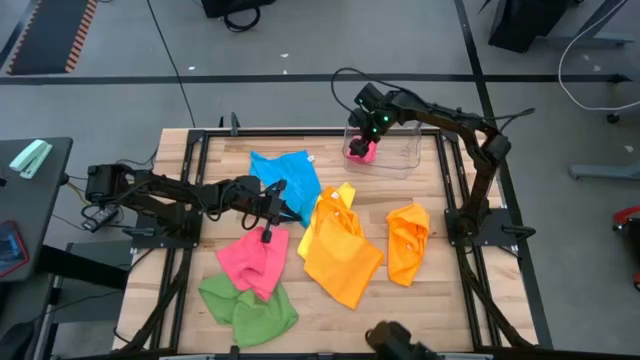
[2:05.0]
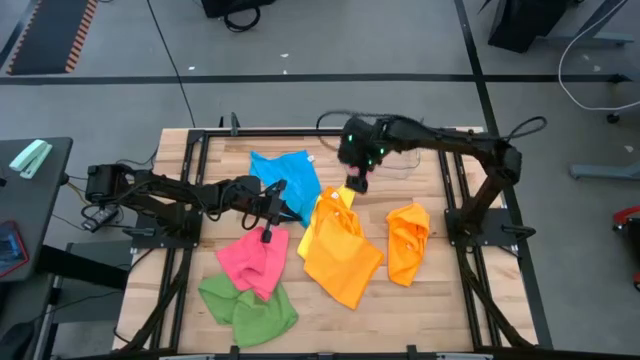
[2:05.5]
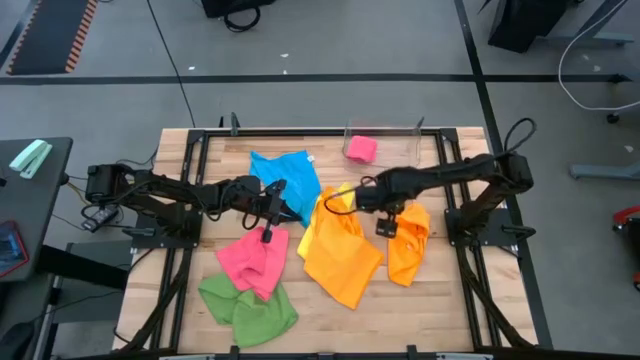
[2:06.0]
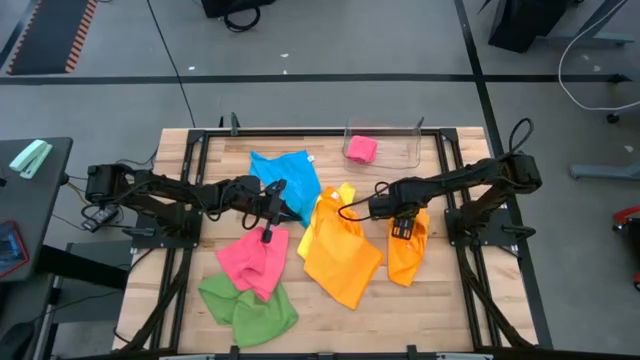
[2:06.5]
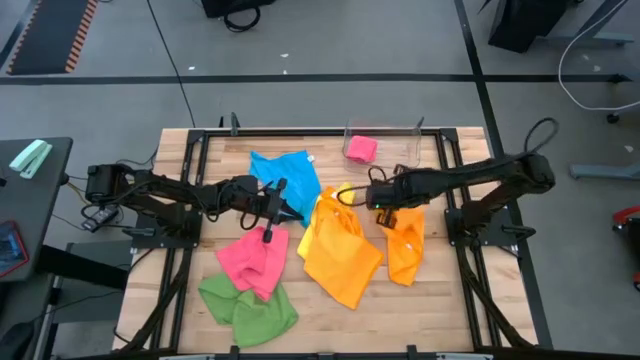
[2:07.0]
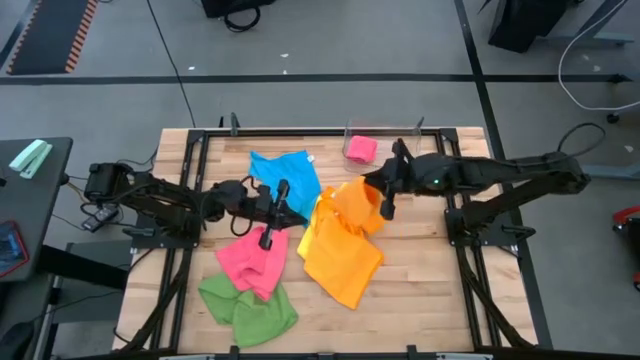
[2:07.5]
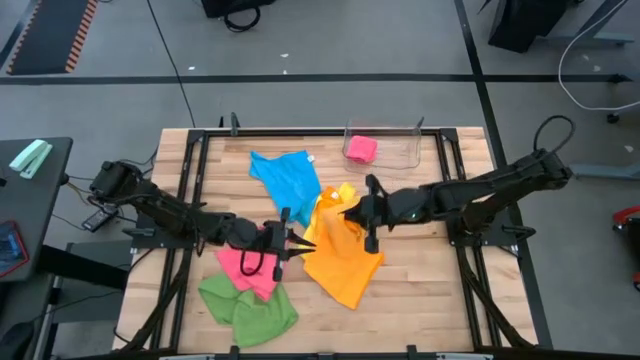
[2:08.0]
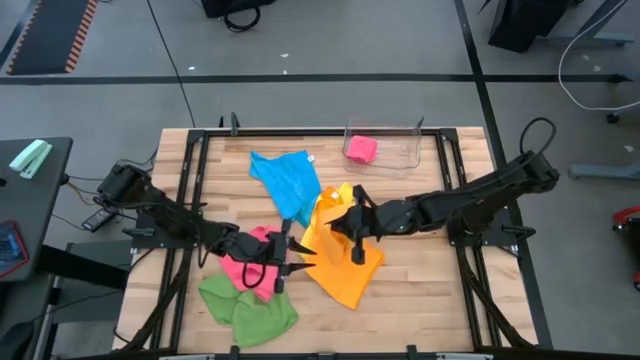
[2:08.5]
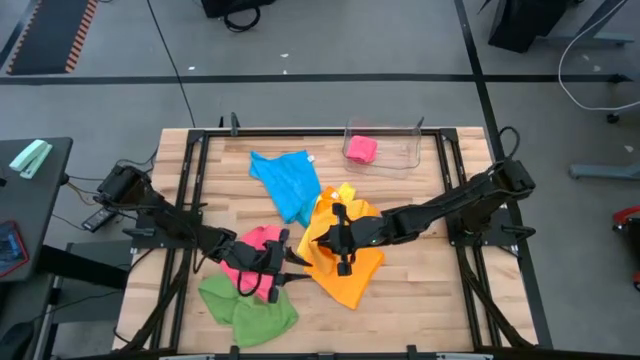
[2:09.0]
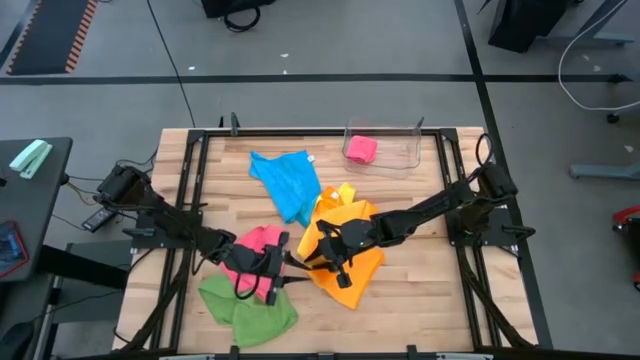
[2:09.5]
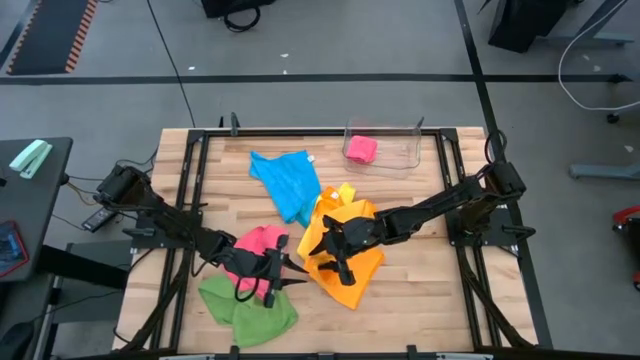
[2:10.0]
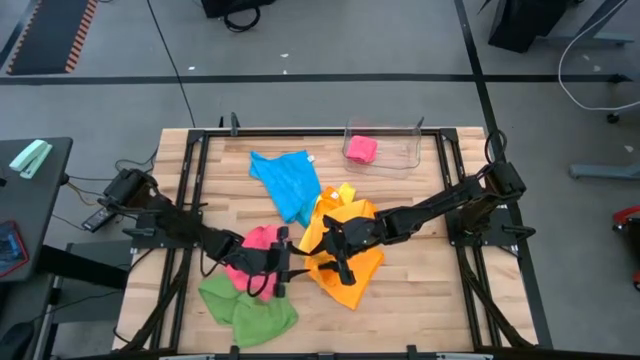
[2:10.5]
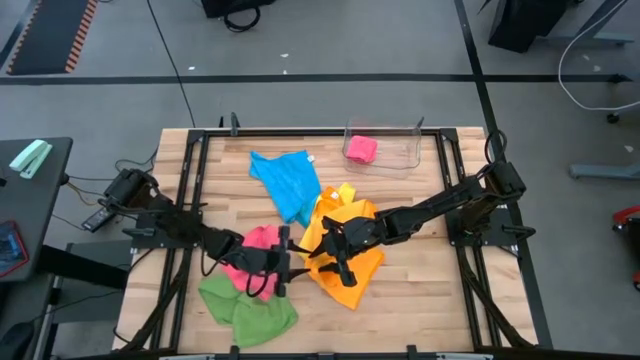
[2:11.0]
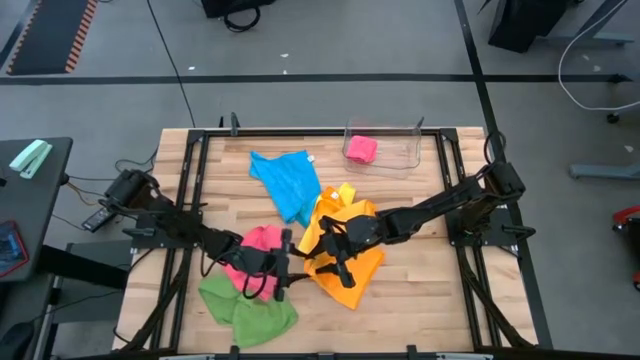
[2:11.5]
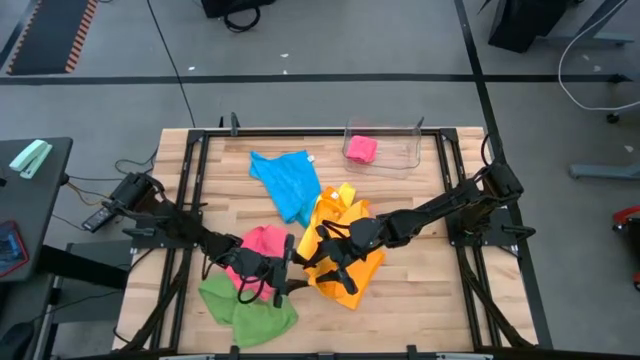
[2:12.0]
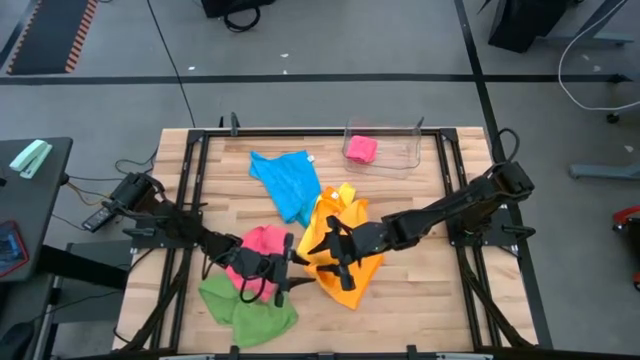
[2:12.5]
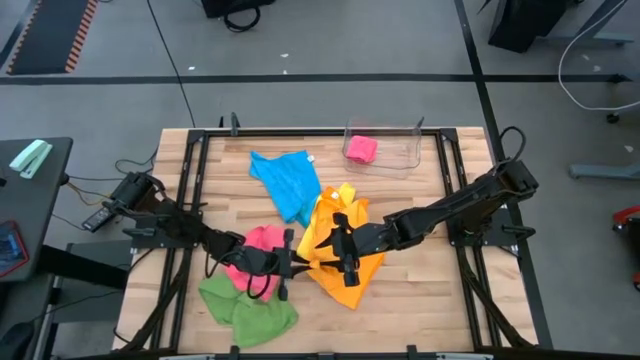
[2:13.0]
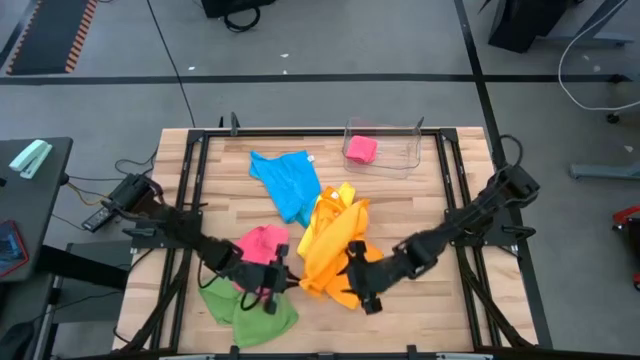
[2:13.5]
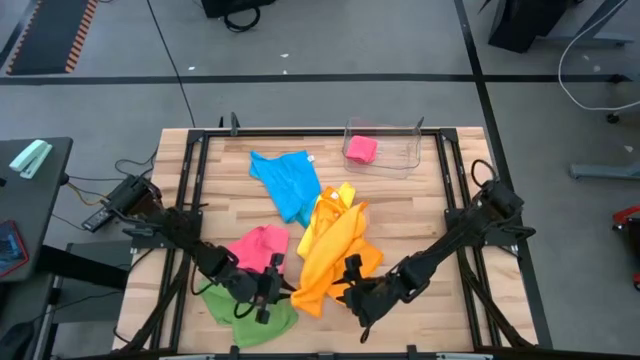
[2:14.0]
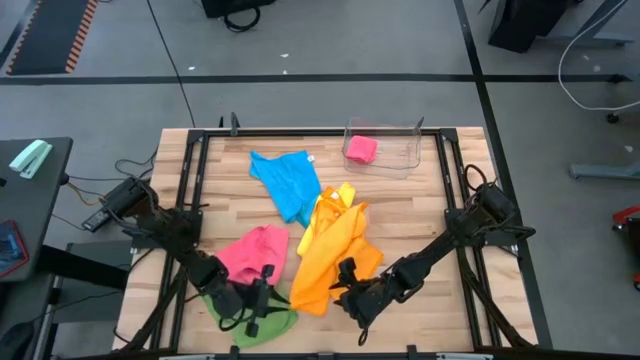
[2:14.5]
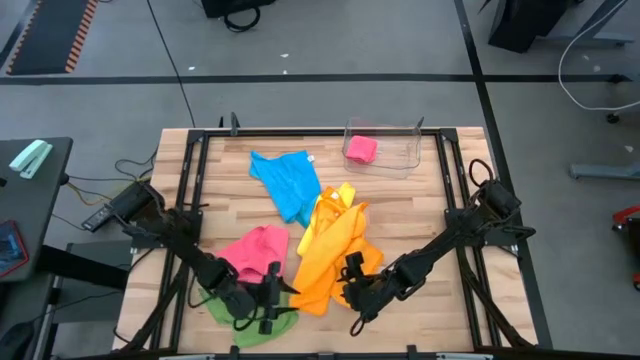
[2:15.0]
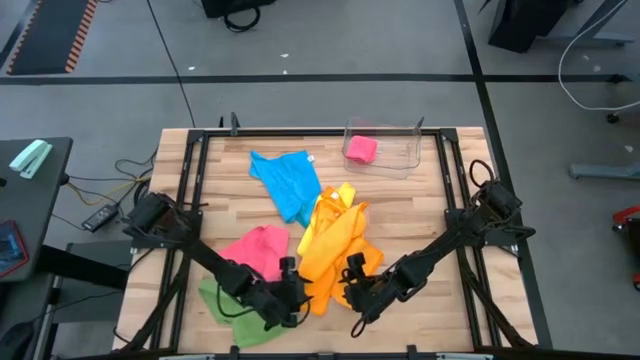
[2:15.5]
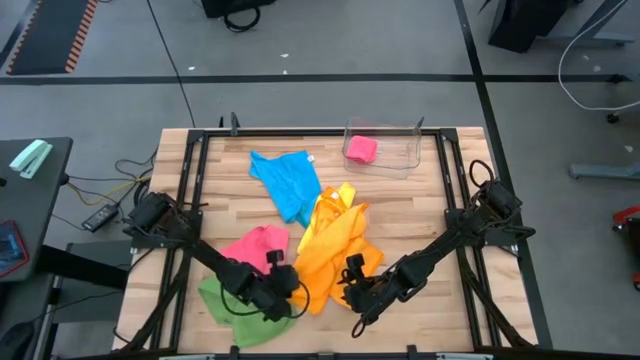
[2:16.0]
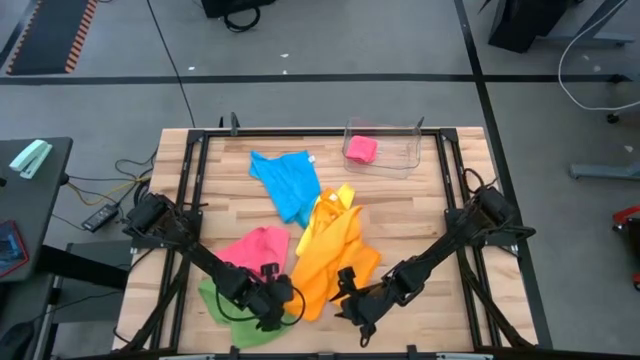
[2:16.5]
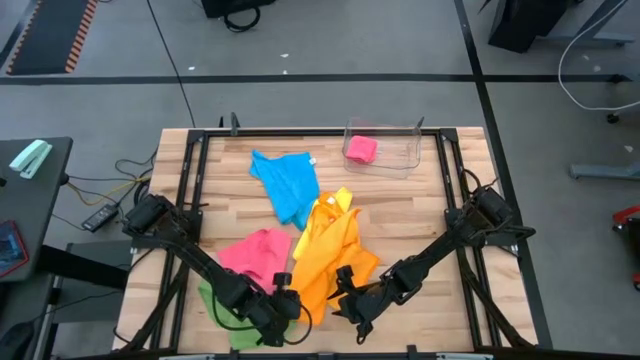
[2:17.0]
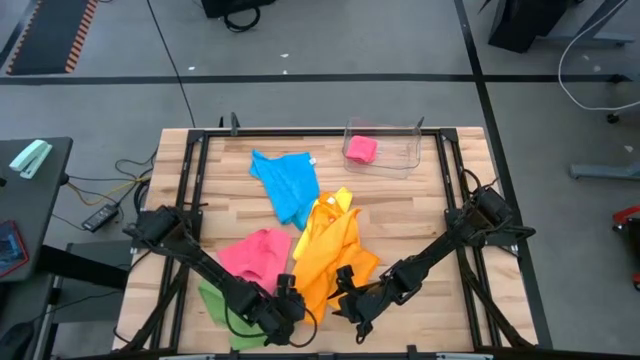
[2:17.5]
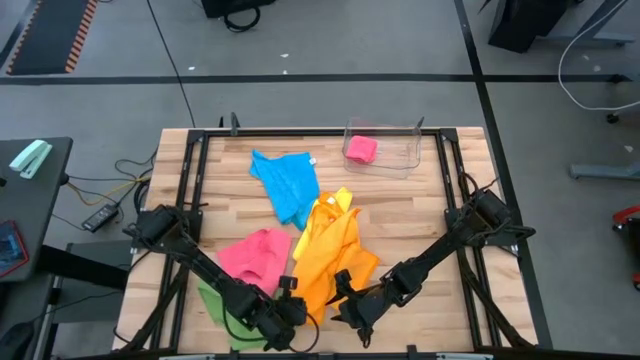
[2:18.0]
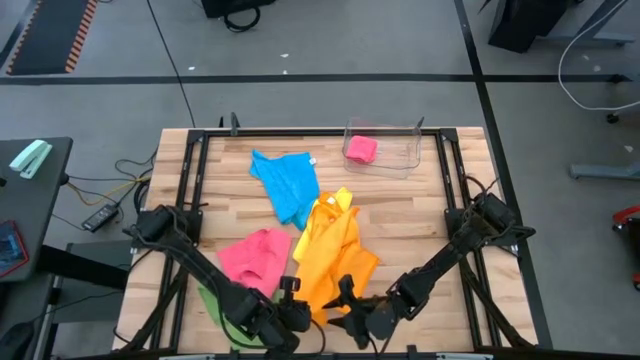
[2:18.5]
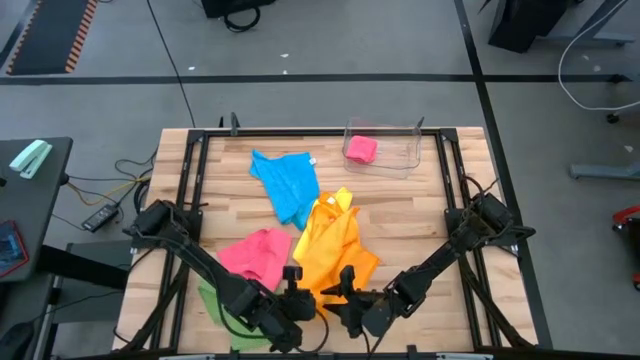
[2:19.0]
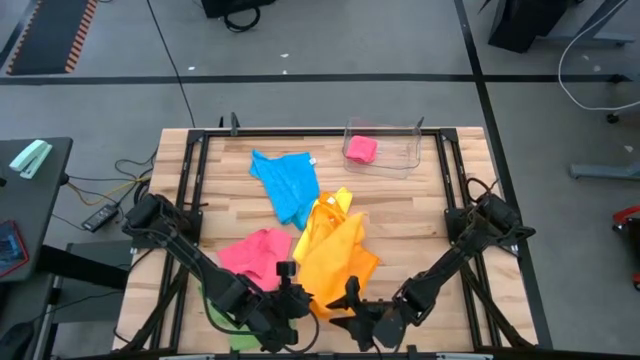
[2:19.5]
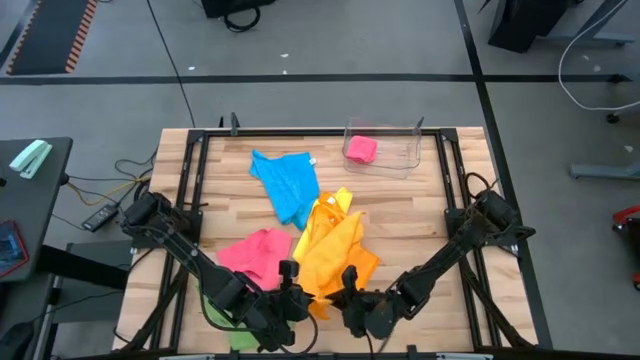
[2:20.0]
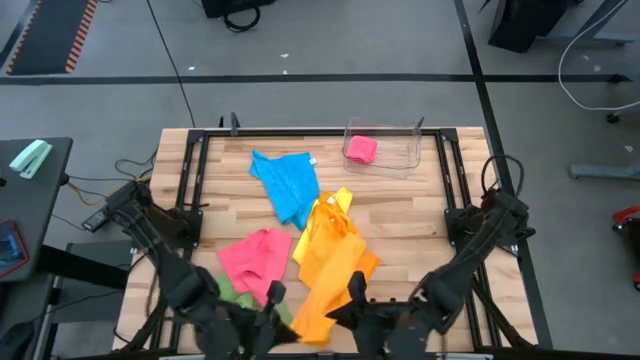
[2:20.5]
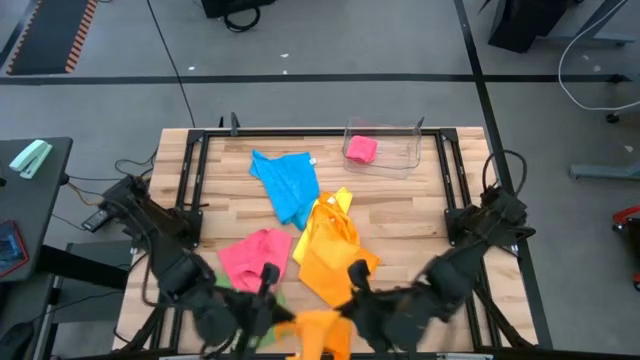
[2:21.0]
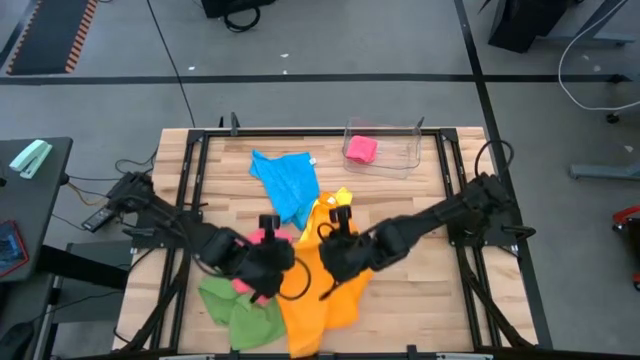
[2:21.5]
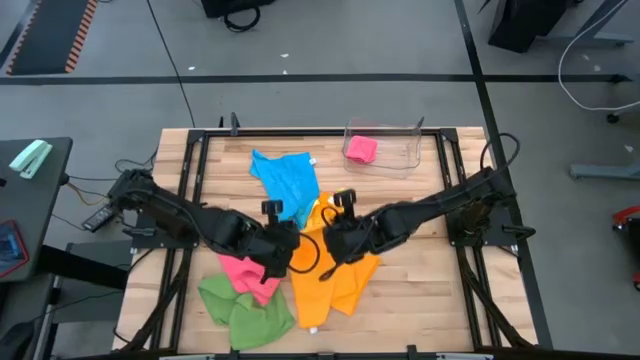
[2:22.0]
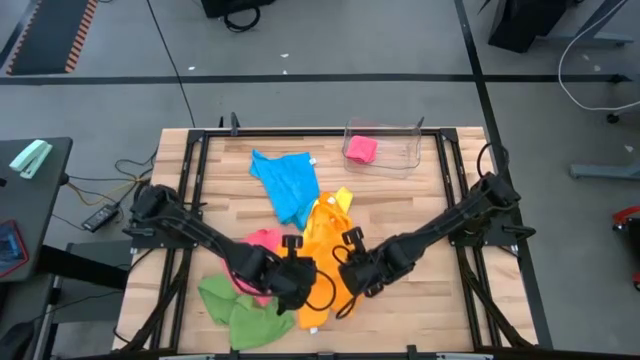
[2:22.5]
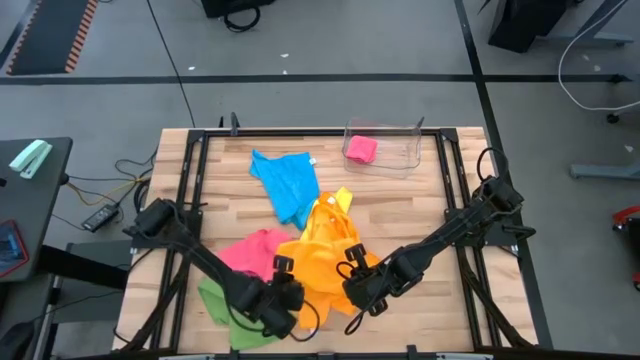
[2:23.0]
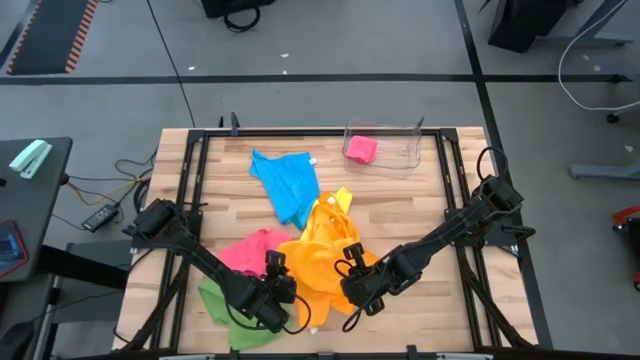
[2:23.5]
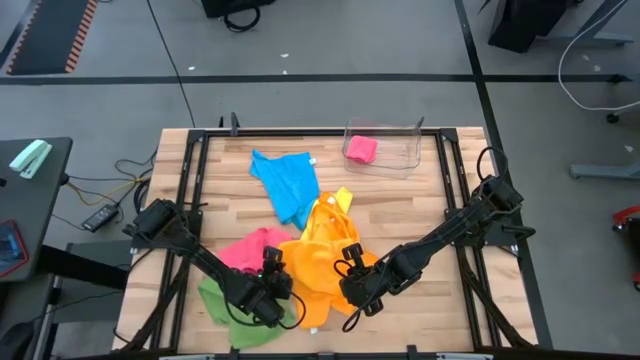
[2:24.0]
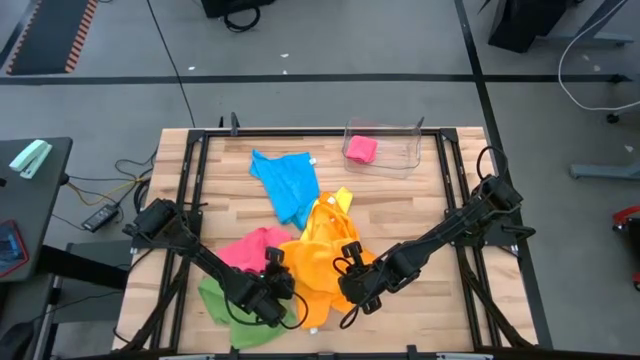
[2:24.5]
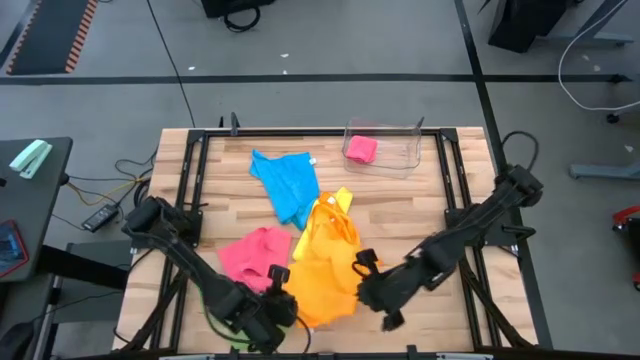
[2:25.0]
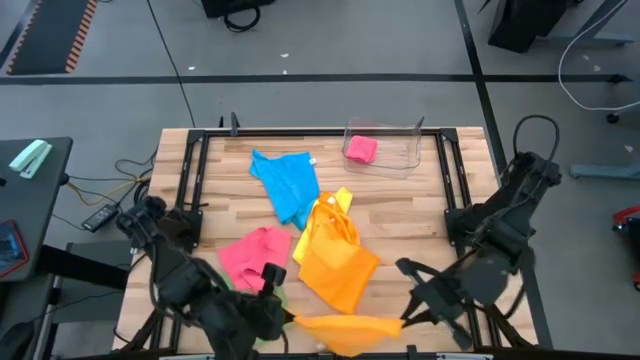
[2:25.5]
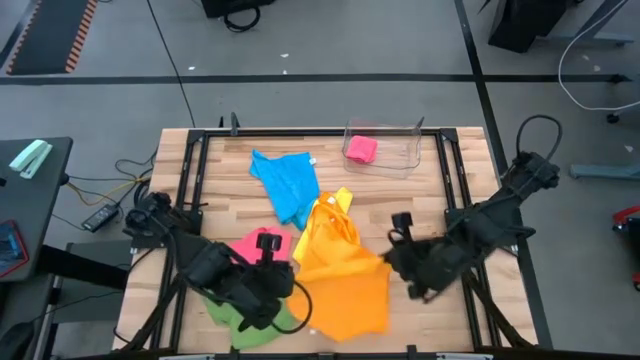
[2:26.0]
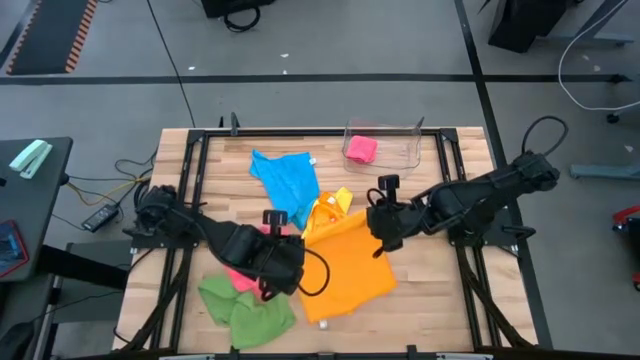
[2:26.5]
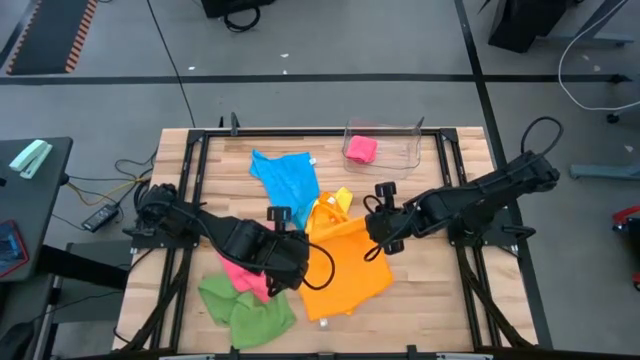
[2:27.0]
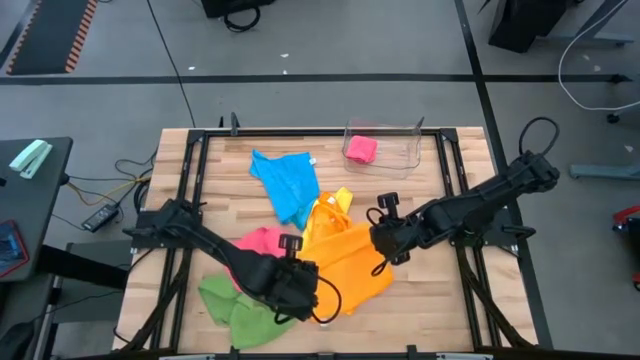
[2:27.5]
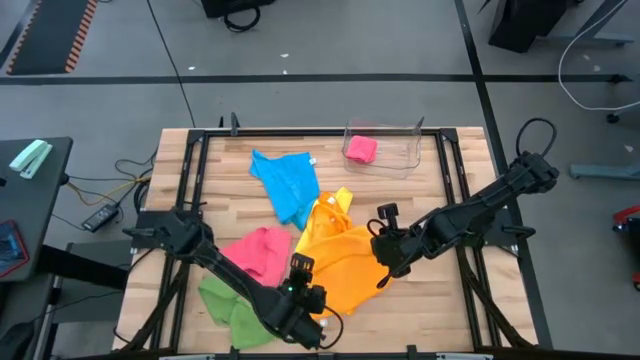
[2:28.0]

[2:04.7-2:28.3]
Task: Fold microfiber towels
Fold the right orange microfiber cloth
